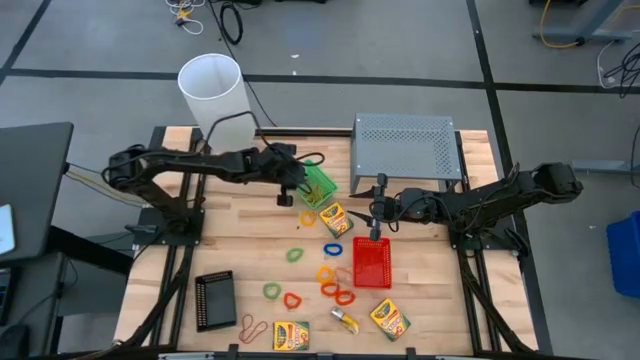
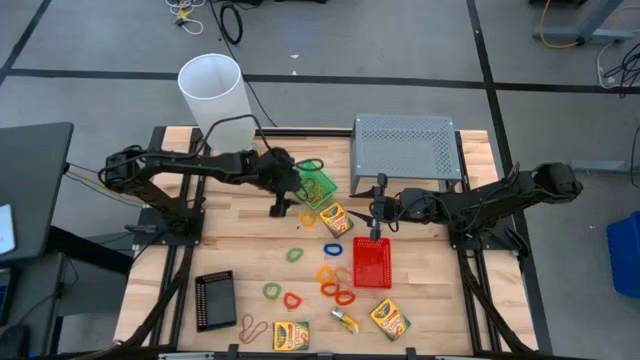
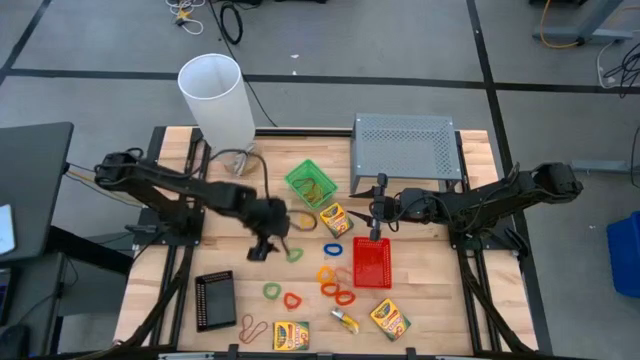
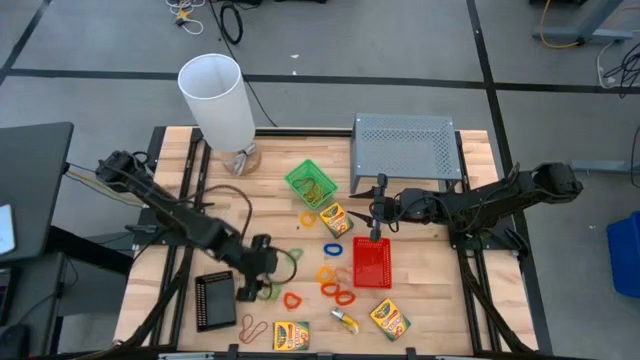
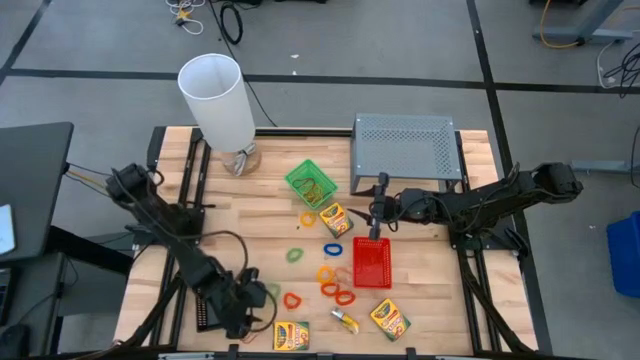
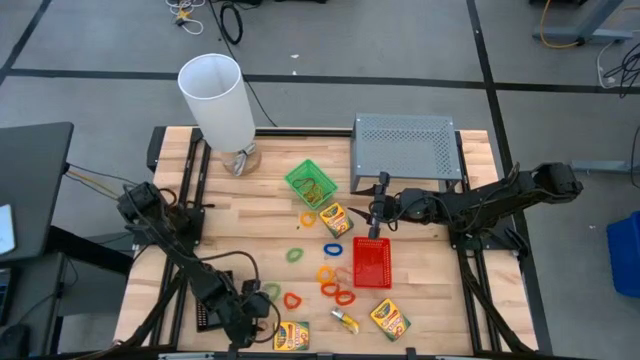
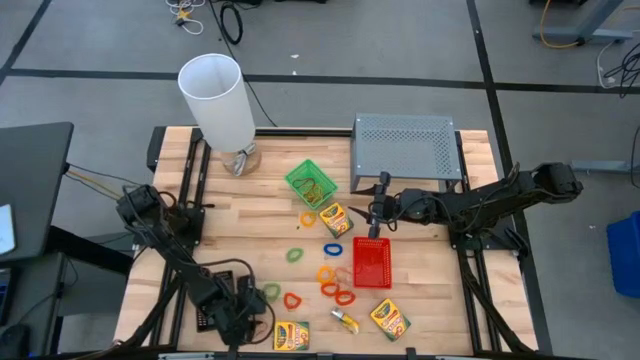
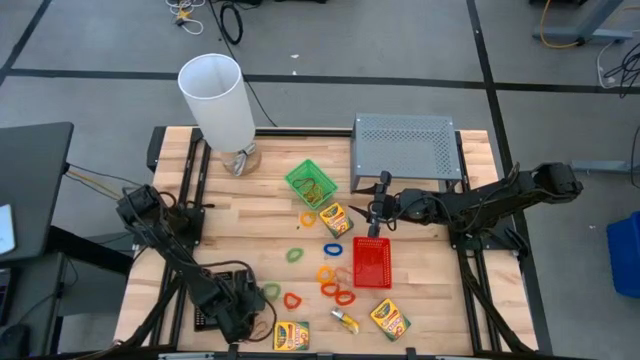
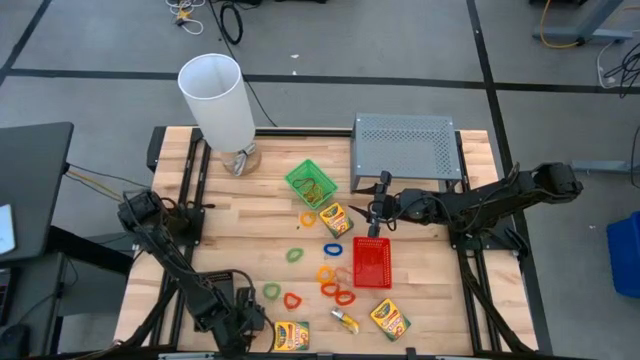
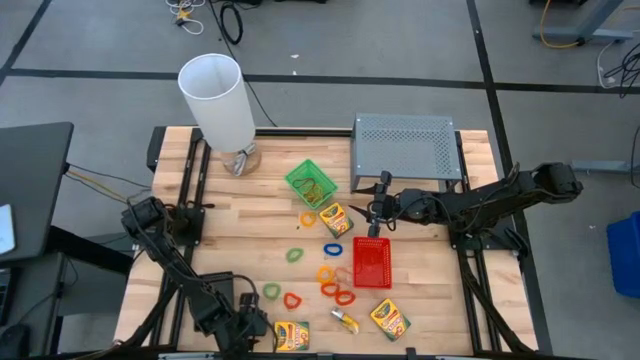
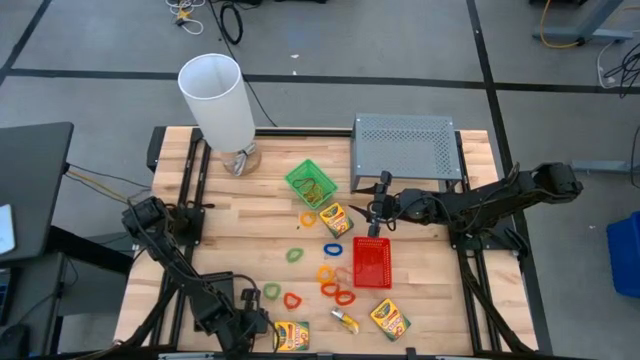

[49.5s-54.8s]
Task: Pick & Place Office Desk Supplies
Put the red rubber band into the green bin

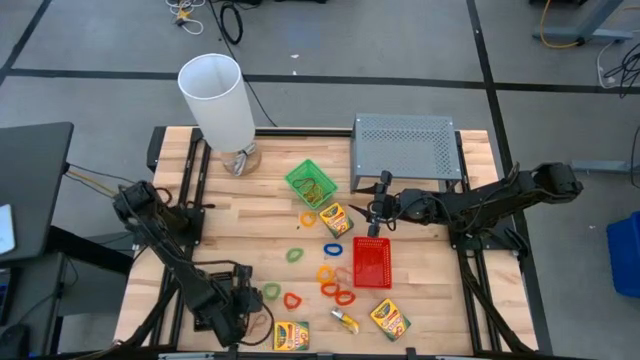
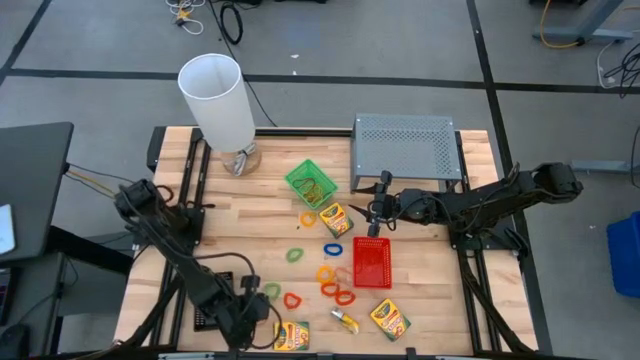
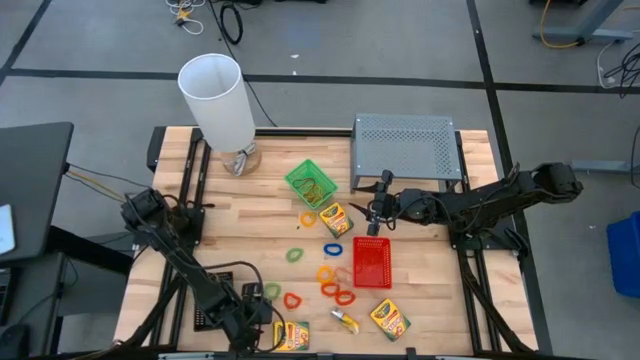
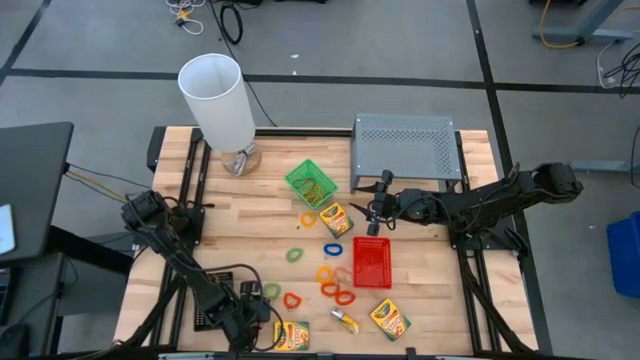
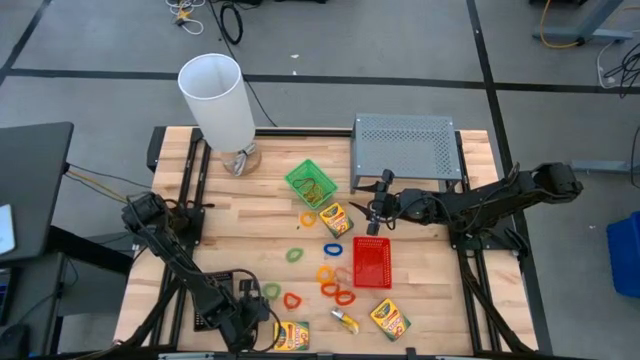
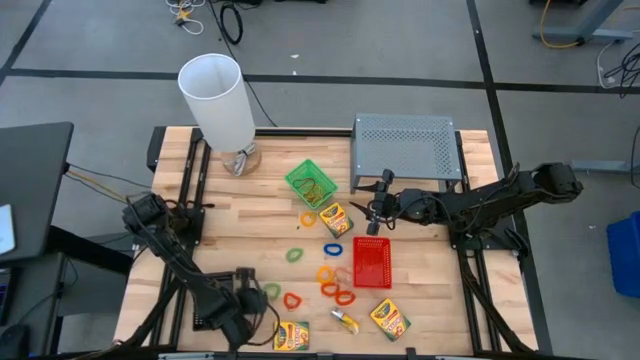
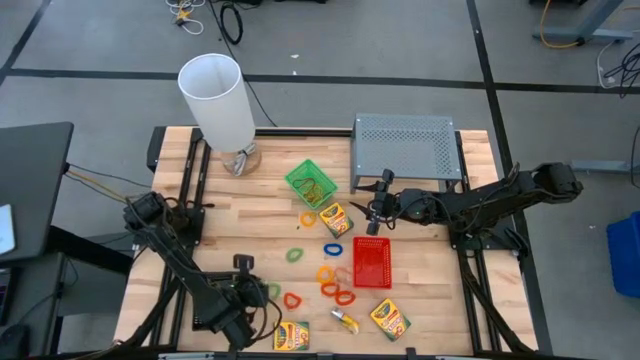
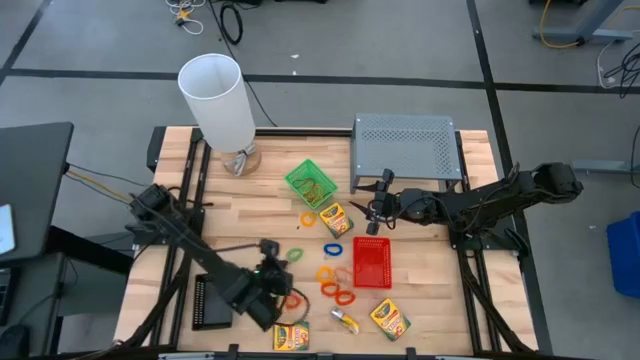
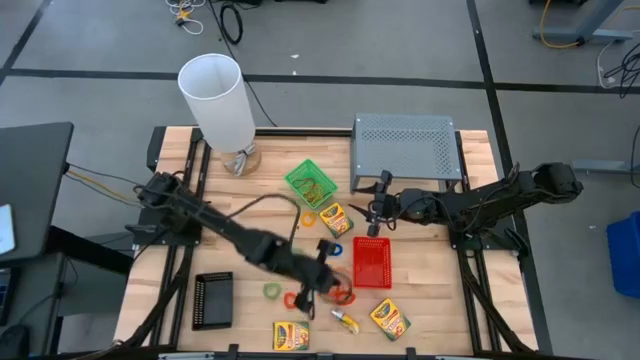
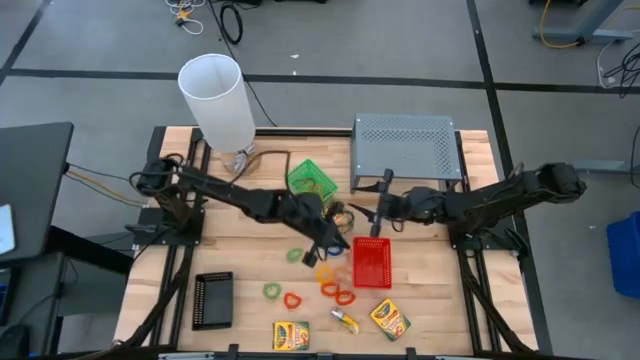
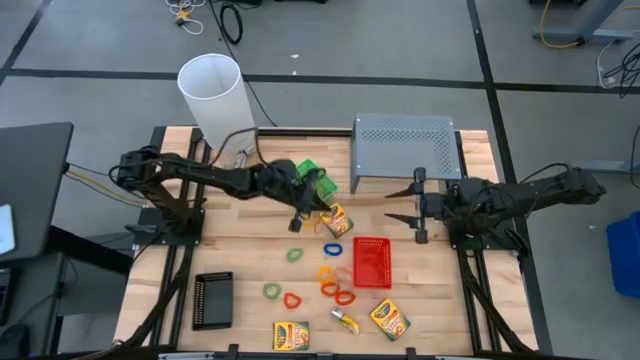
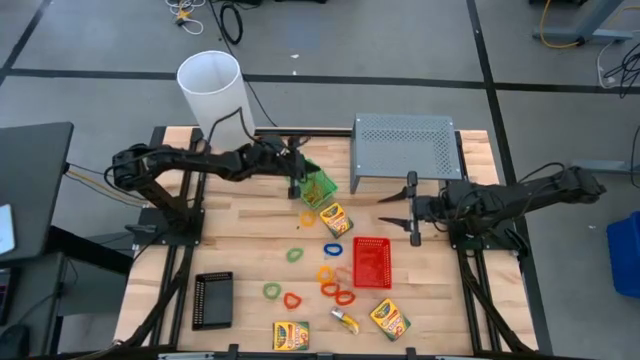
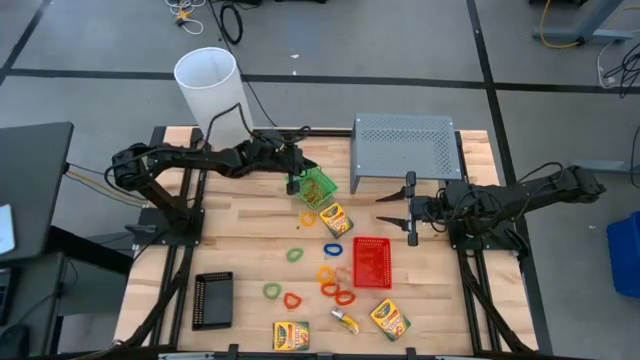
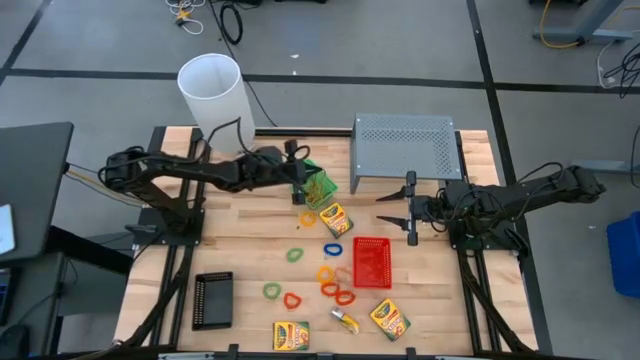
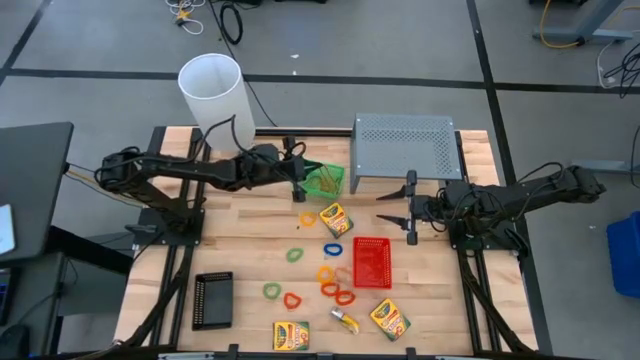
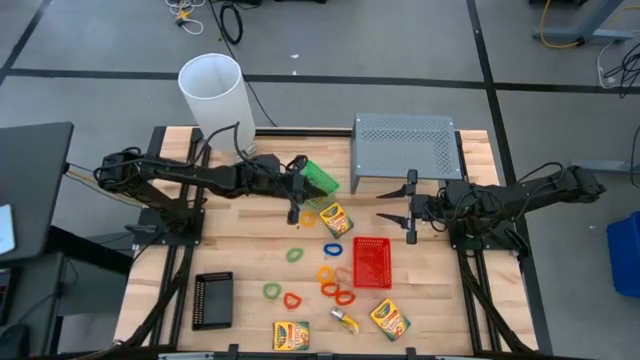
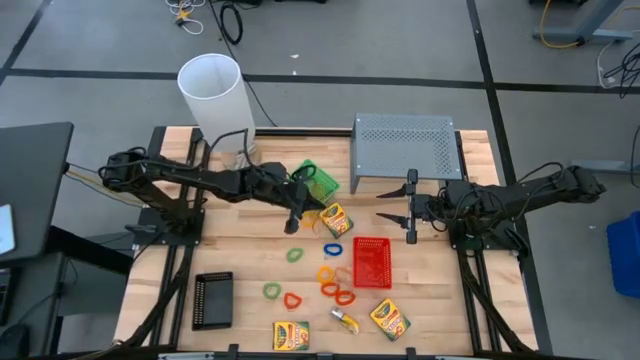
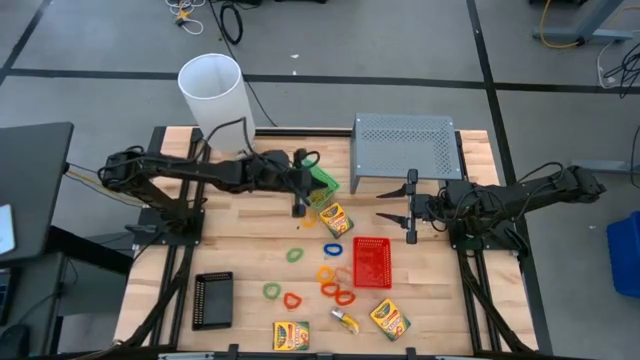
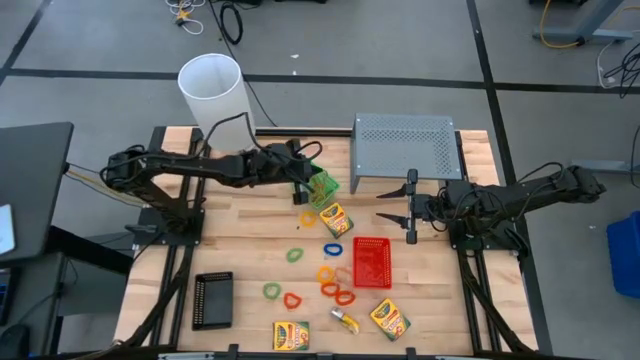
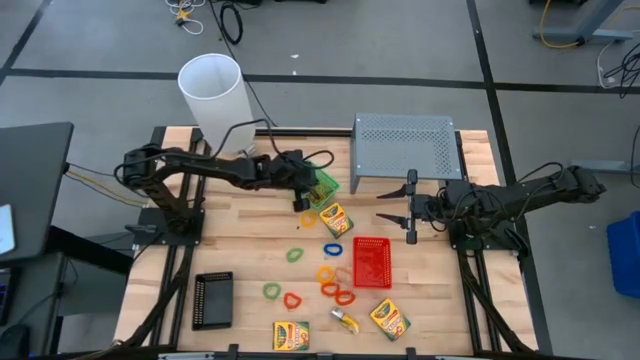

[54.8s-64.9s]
Put the red rubber band into the green bin

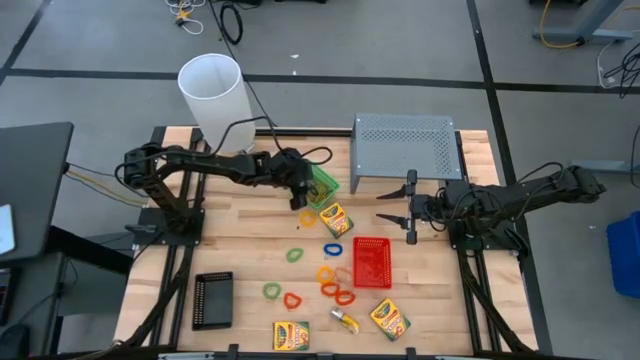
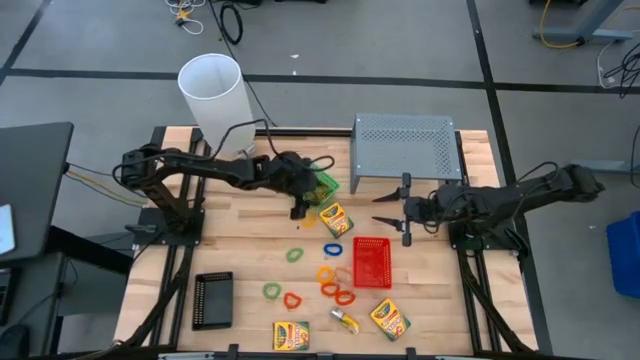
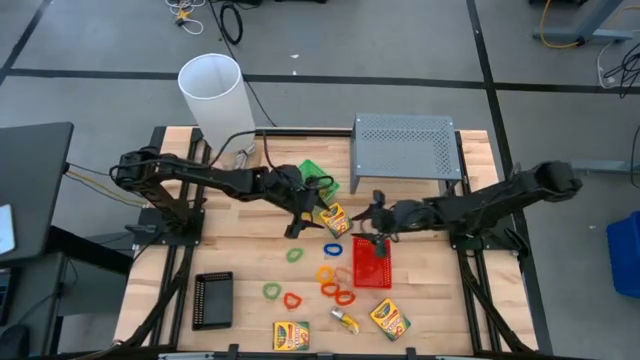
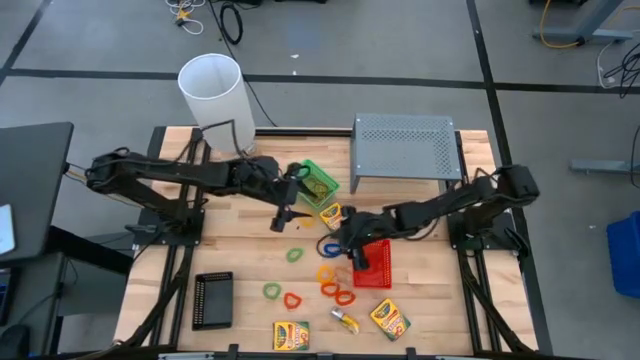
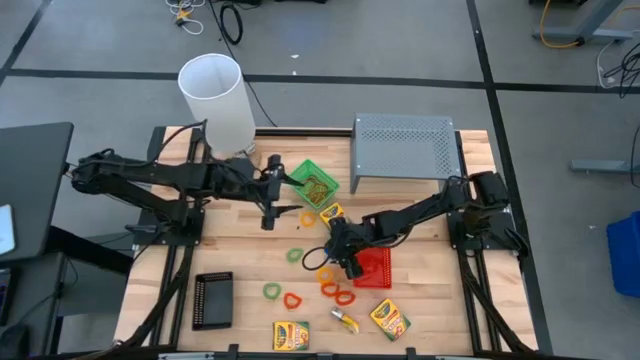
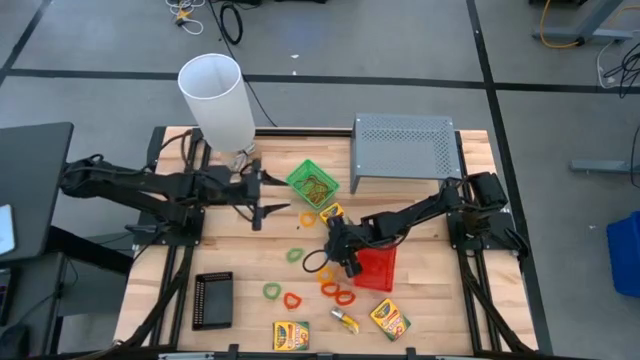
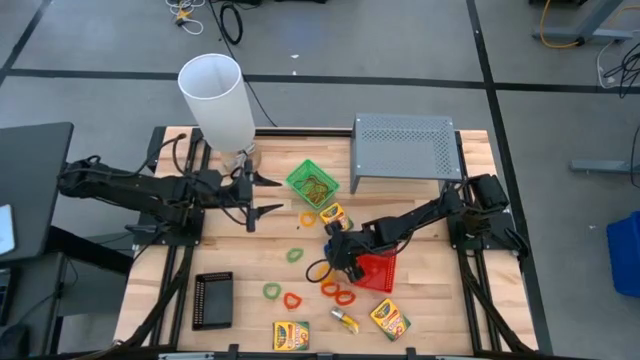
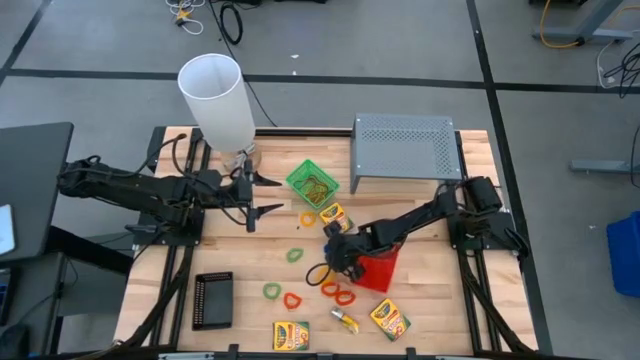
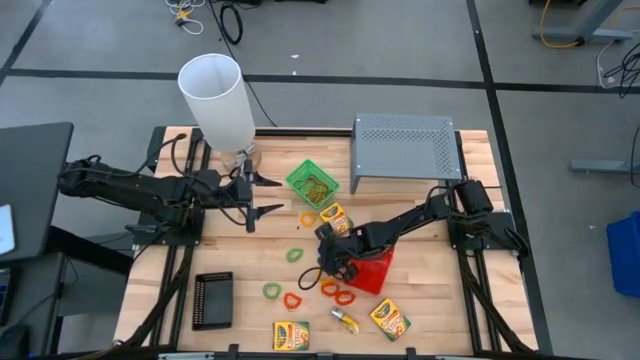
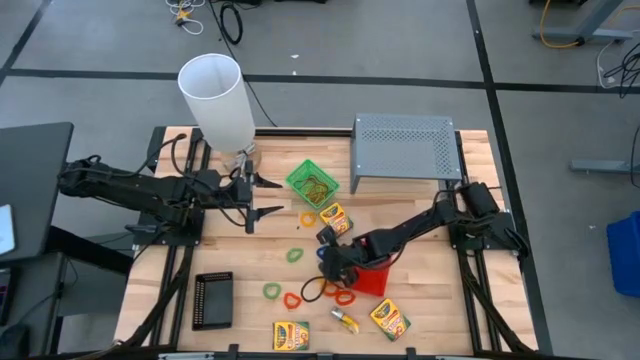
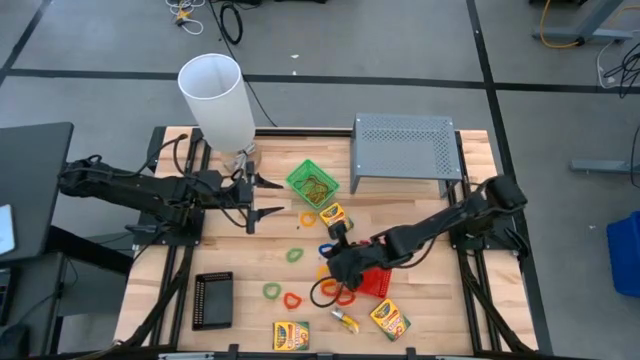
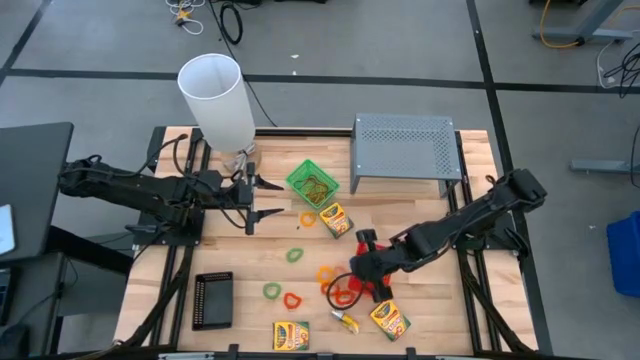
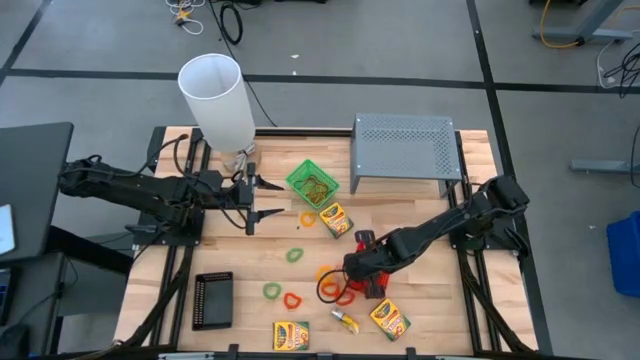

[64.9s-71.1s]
Put the blue spring keychain into the red bin

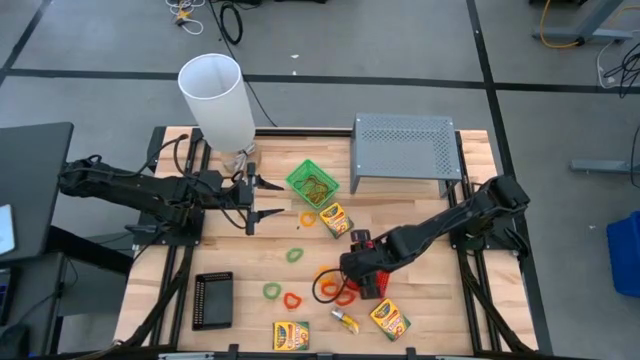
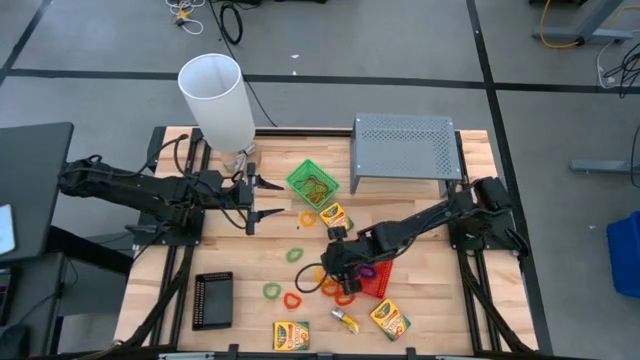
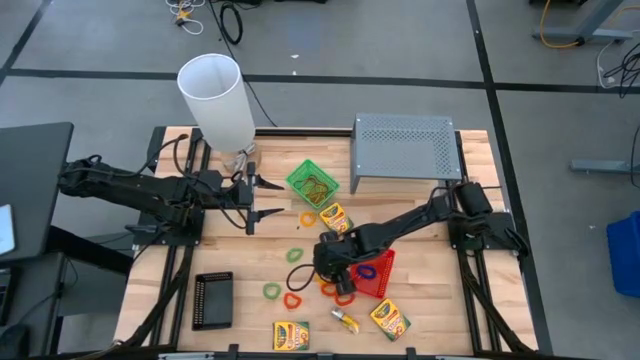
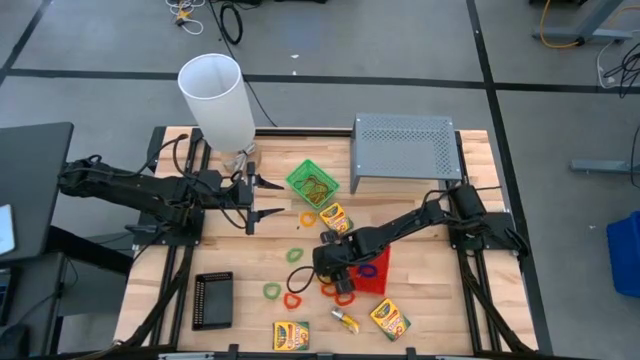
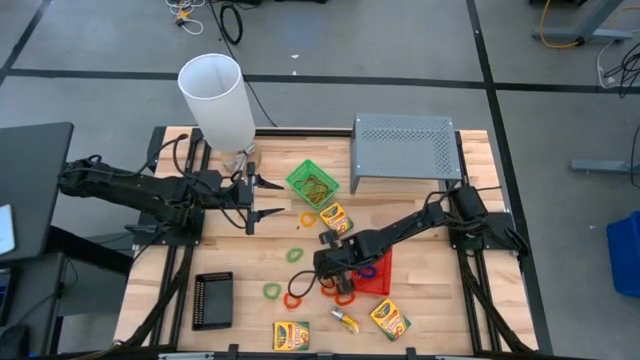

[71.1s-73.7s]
Put the yellow spring keychain into the red bin
